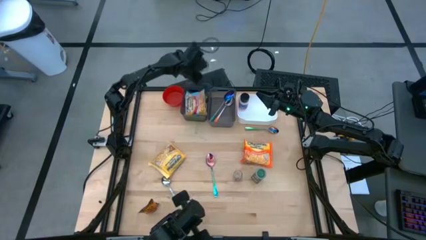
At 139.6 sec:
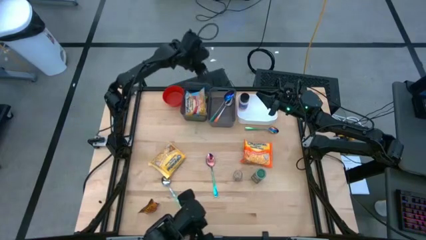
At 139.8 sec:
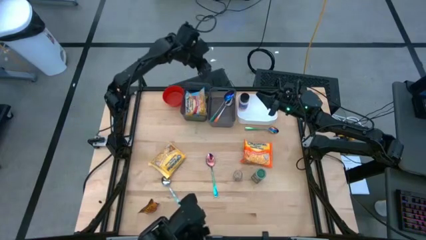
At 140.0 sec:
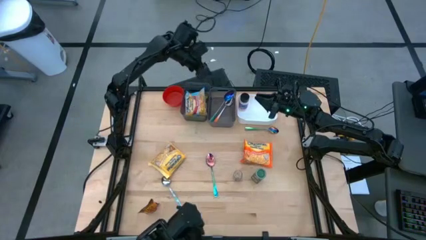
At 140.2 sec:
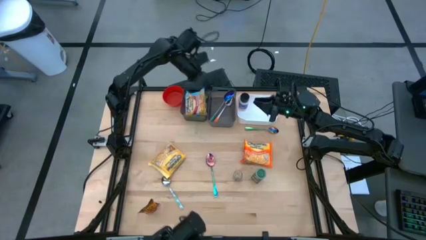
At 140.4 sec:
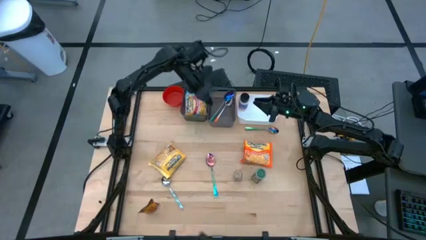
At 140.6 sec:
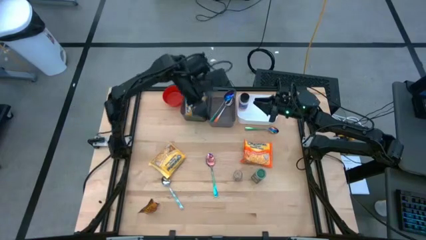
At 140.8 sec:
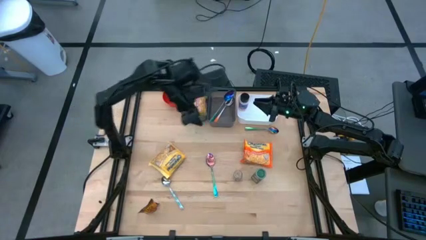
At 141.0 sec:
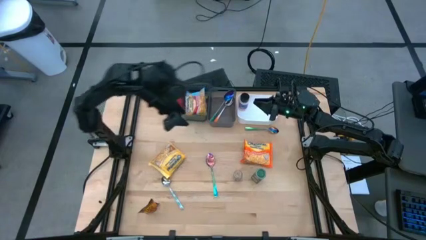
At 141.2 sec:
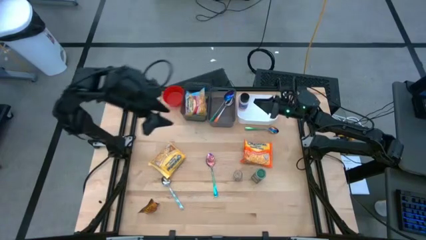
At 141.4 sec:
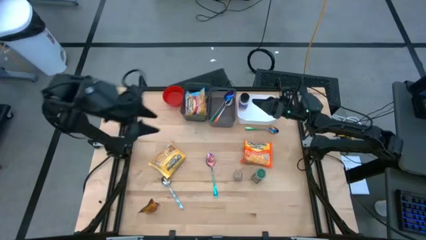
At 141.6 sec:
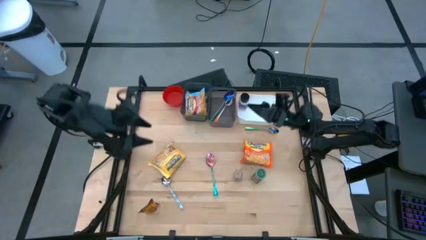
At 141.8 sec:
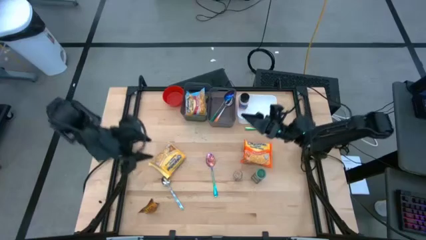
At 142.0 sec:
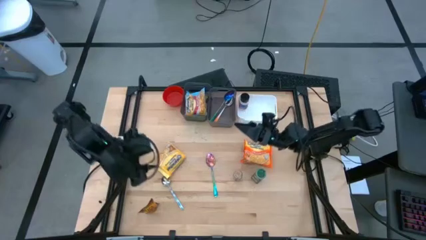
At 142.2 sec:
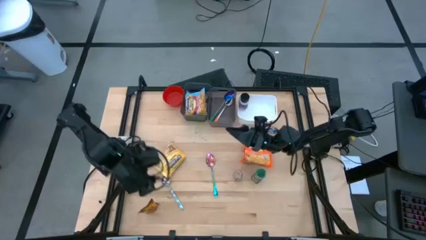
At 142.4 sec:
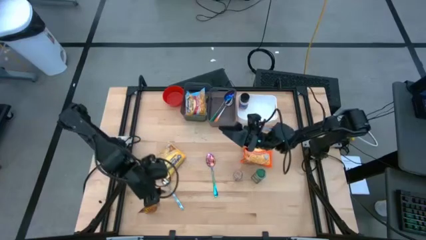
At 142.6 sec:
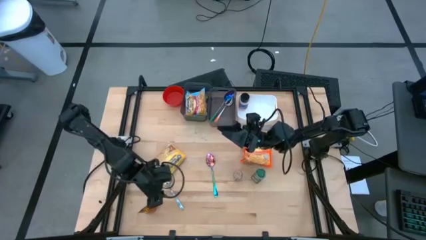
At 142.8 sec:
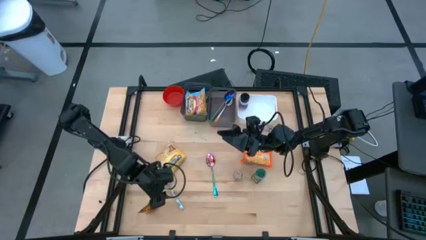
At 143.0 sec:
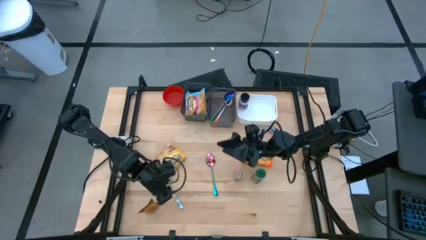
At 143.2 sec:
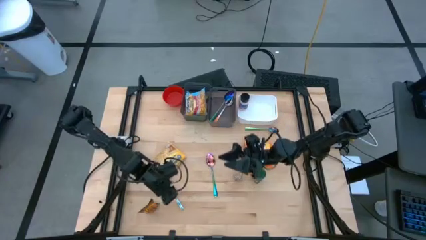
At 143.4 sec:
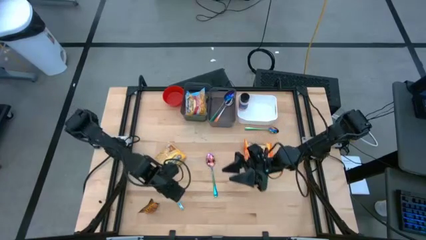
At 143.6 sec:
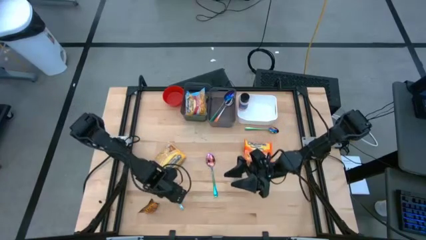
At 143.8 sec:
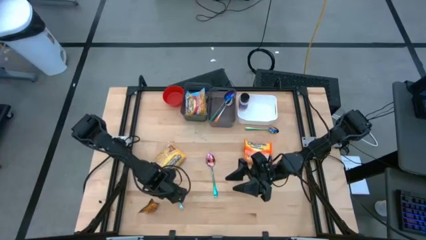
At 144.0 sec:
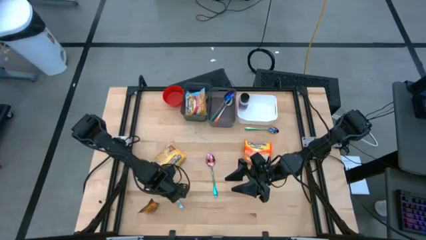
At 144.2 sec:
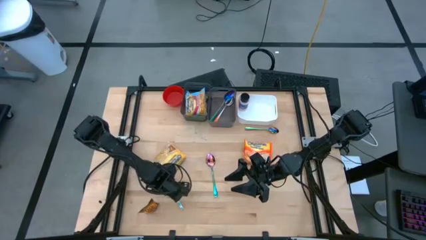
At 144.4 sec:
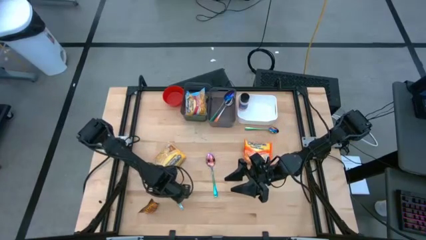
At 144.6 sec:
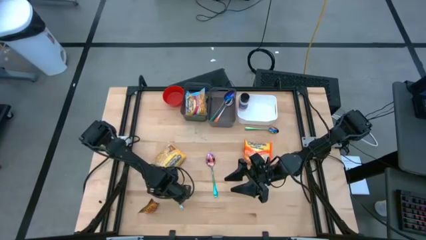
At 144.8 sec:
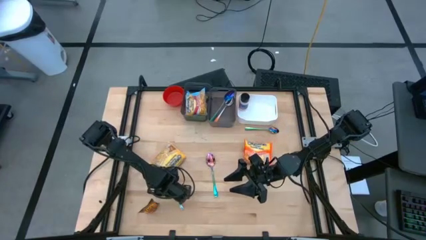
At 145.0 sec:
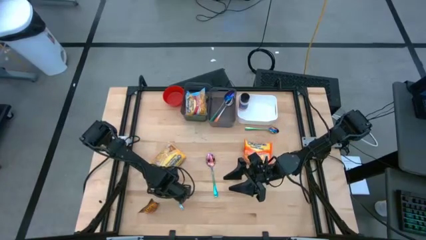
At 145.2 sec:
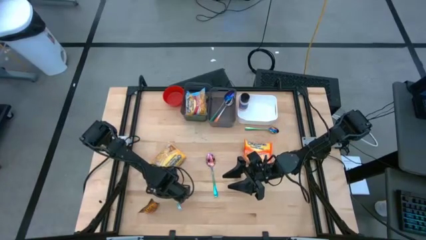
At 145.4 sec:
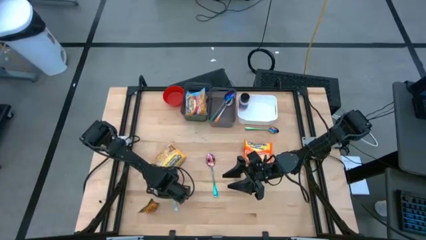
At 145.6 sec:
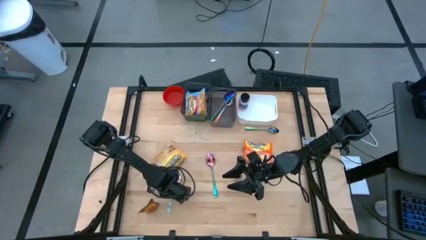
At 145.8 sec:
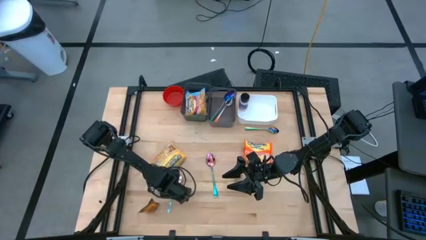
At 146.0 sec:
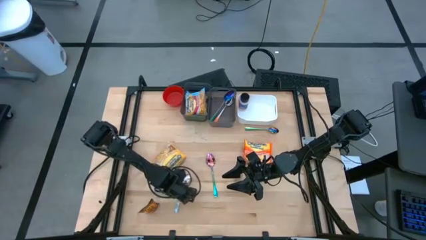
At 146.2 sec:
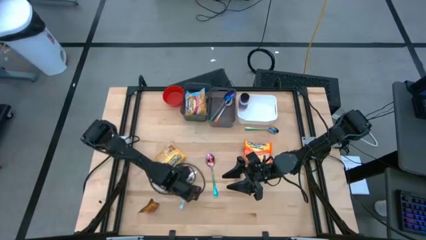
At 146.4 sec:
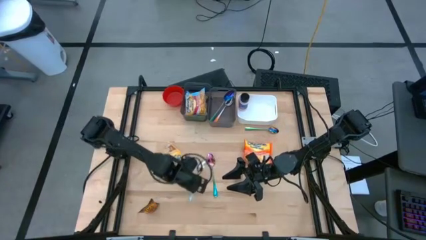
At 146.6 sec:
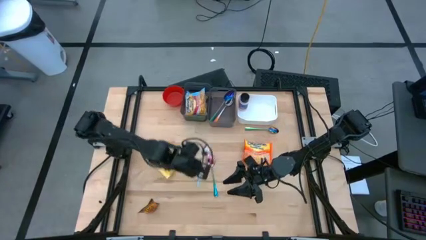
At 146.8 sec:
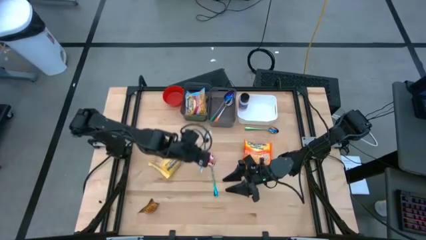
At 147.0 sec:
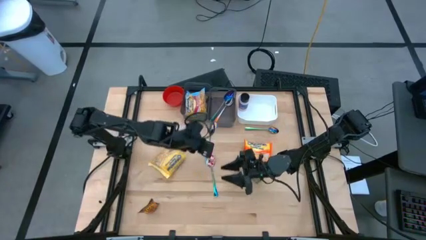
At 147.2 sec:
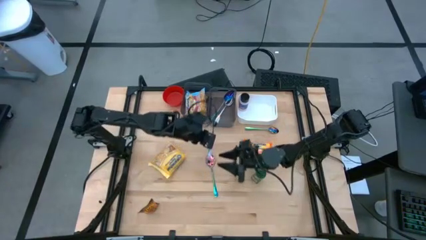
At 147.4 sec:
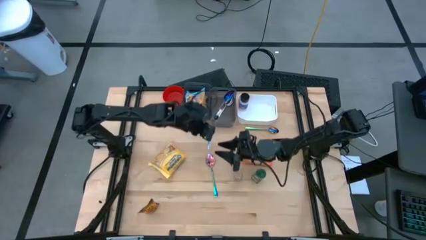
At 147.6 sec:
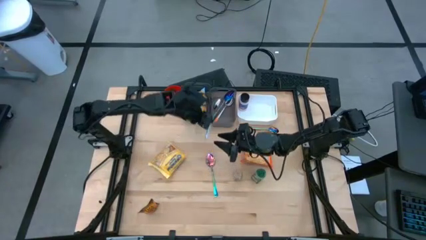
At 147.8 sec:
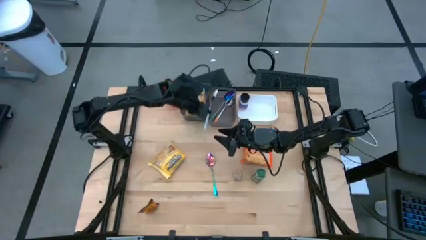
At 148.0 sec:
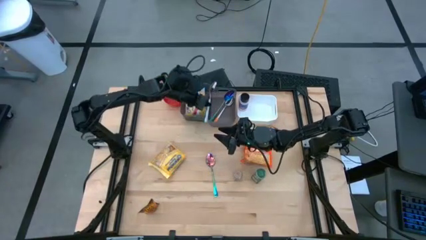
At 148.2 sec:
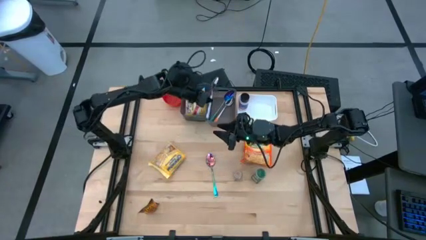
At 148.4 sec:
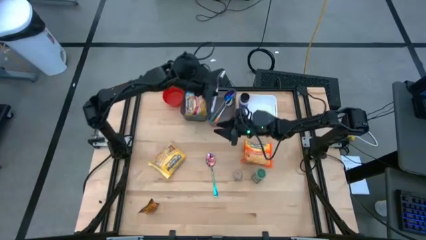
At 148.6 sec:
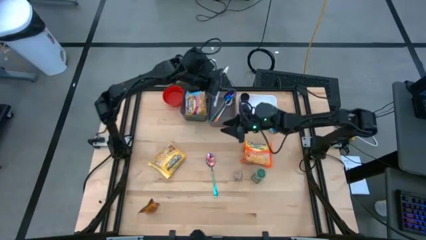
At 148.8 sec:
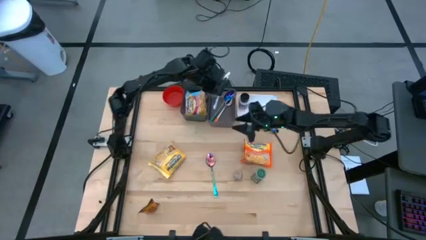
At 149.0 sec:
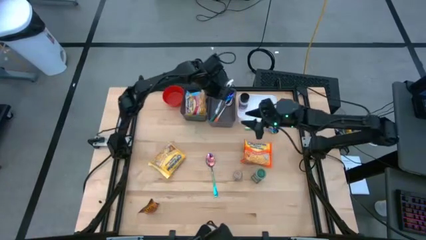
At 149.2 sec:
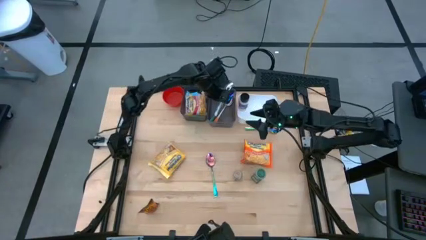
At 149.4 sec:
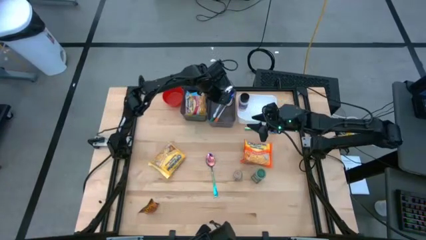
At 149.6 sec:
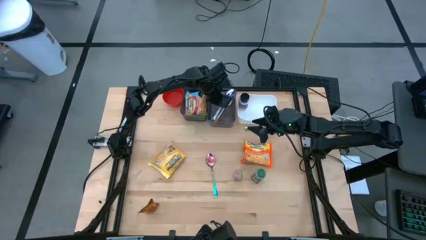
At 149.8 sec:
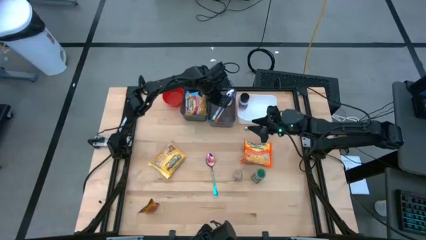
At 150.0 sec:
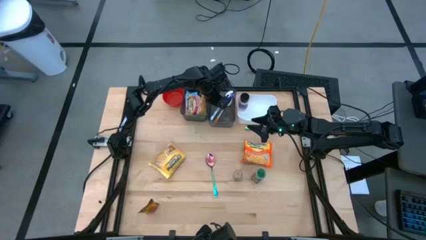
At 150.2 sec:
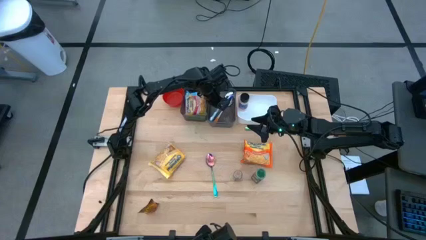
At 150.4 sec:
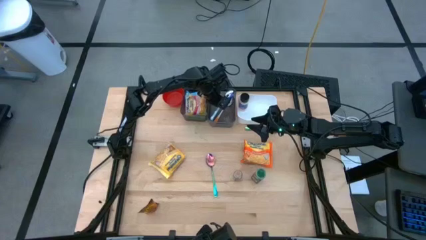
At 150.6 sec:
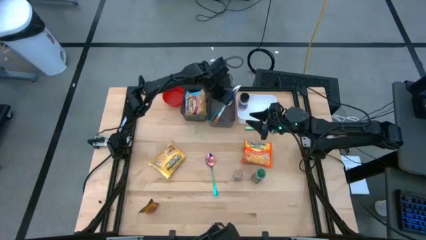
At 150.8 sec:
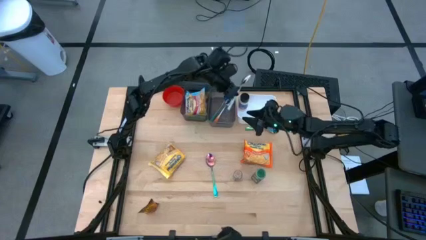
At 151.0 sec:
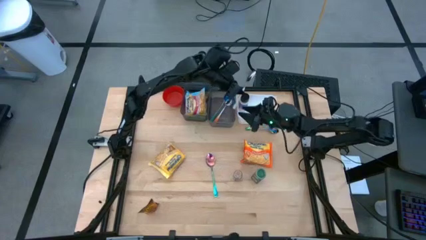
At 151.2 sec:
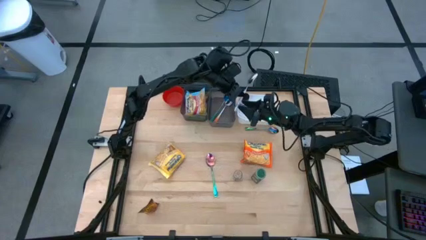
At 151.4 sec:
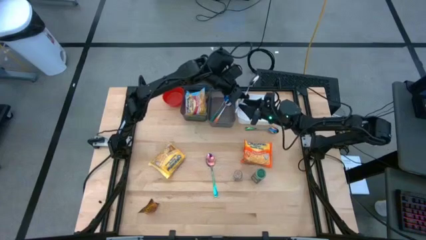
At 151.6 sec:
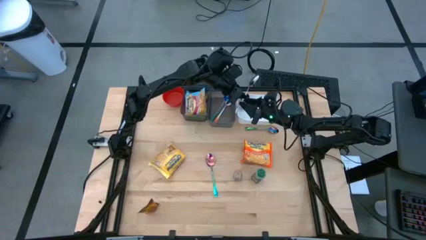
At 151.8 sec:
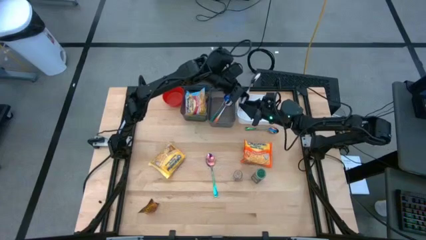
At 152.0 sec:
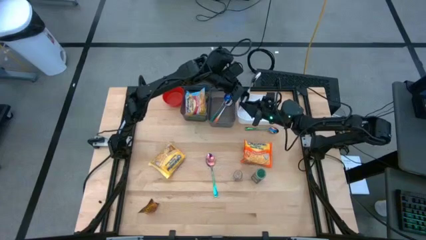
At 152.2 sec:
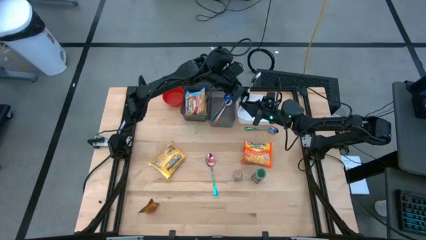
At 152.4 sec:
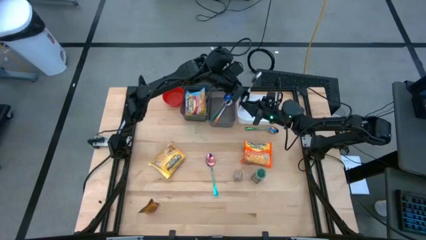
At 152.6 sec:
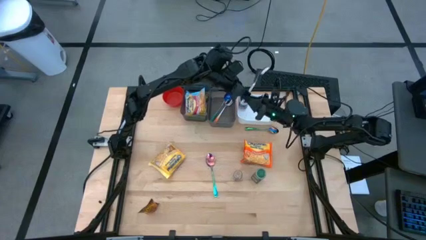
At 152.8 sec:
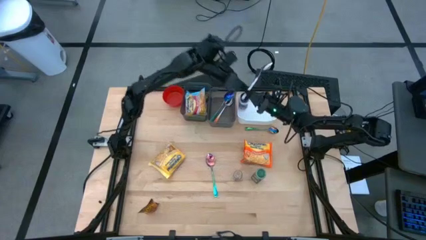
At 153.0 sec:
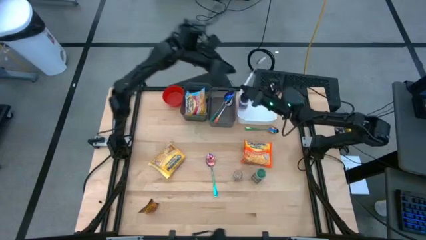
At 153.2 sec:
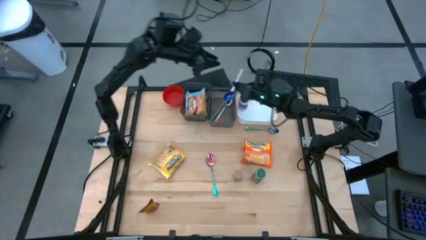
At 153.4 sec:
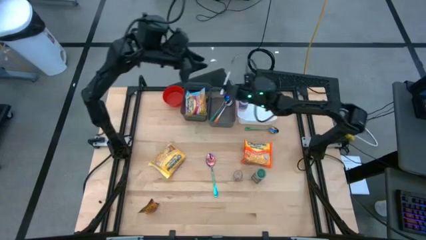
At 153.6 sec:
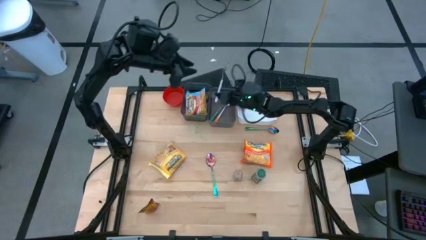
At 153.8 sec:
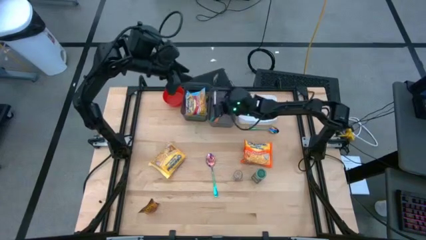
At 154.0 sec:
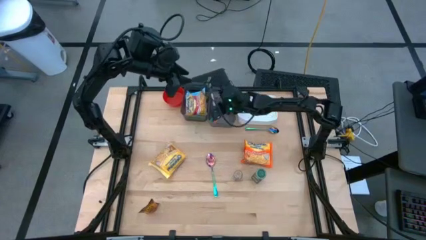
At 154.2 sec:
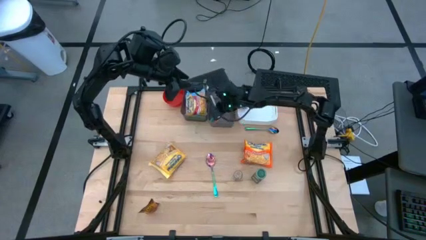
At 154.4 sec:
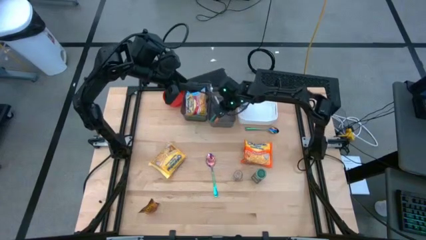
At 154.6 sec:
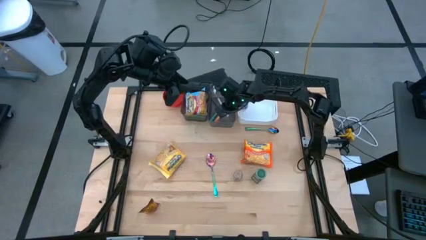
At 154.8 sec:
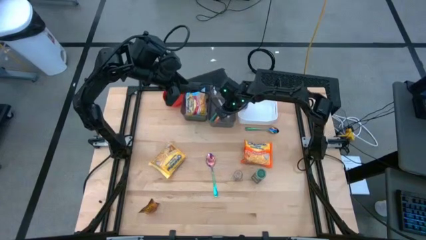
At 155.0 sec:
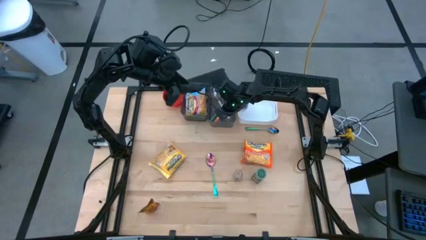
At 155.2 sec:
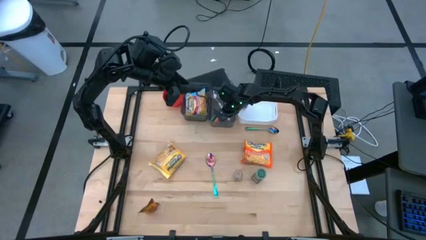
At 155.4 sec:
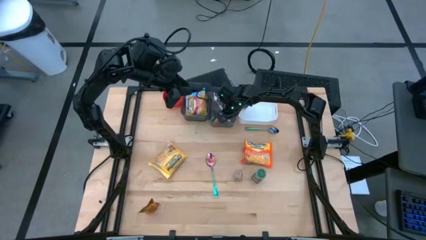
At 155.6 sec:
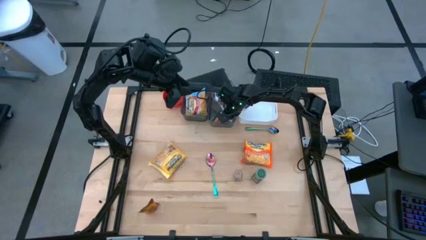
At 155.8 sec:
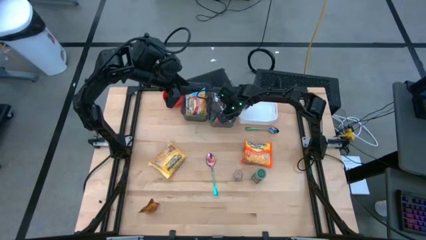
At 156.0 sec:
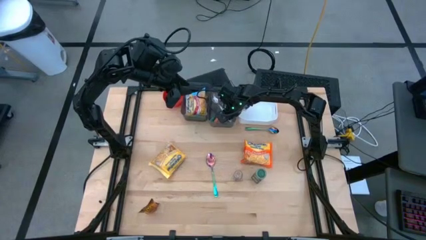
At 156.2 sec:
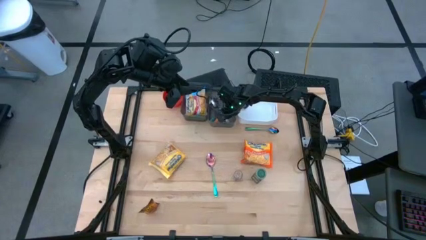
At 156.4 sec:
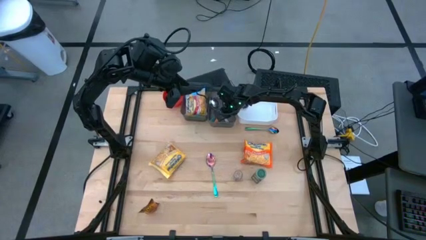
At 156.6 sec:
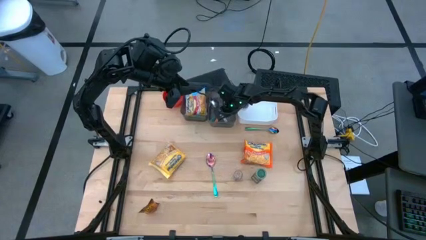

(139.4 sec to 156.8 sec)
Task: Pick & Place Food Item
Put the patterned spoon into the right black bin
